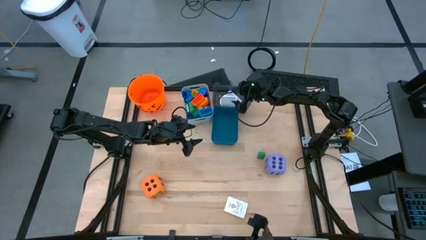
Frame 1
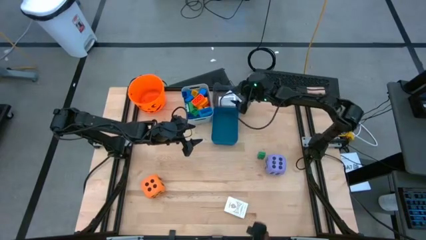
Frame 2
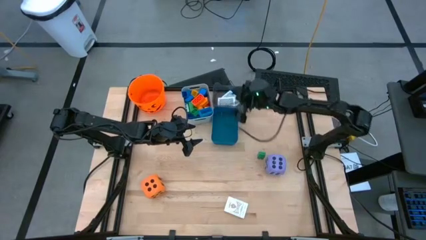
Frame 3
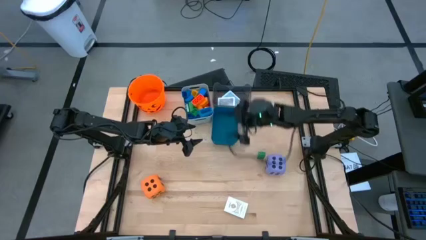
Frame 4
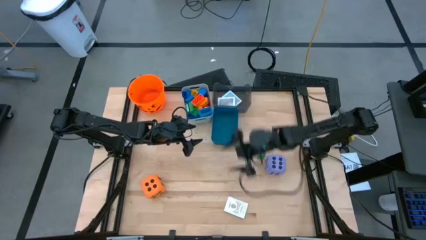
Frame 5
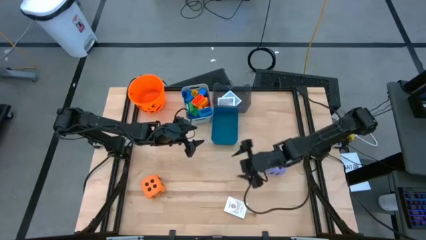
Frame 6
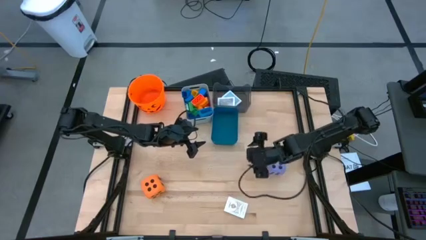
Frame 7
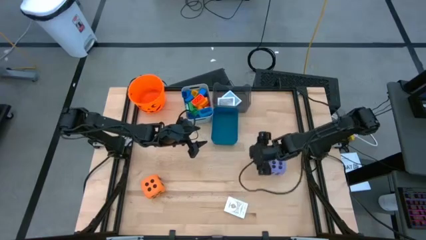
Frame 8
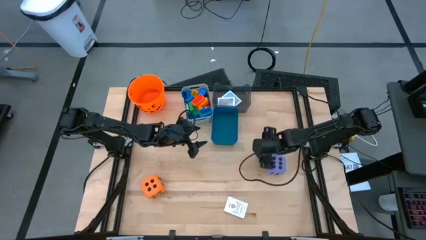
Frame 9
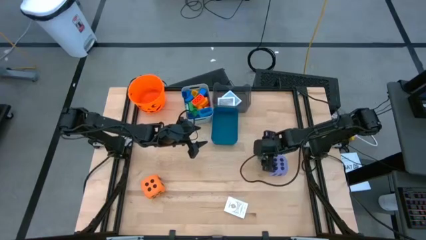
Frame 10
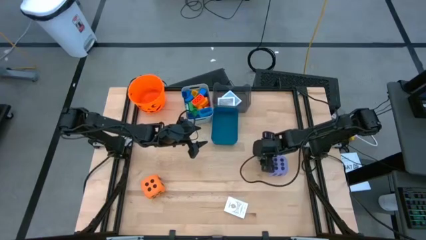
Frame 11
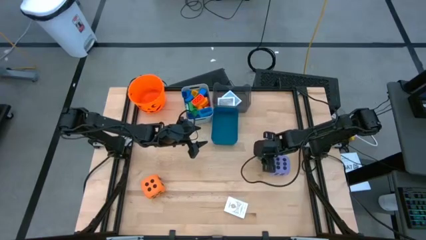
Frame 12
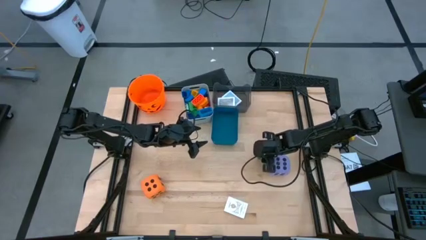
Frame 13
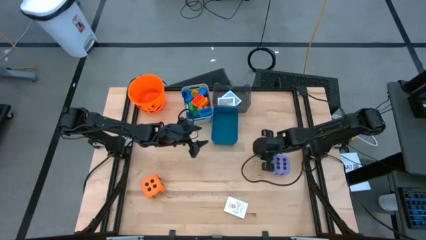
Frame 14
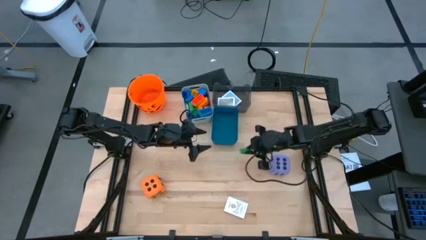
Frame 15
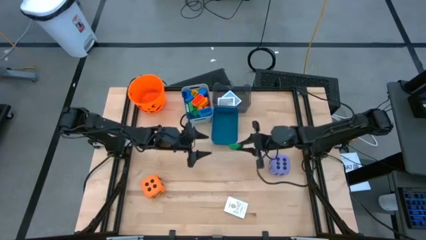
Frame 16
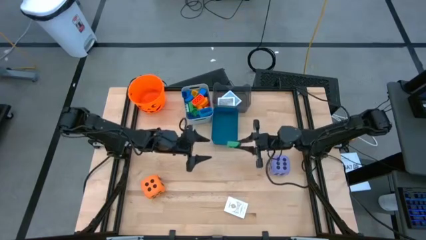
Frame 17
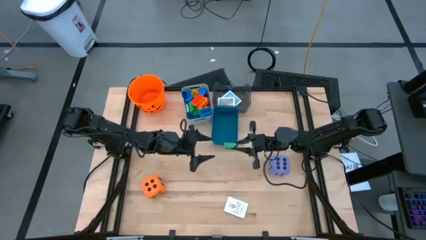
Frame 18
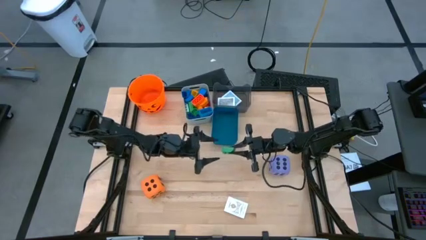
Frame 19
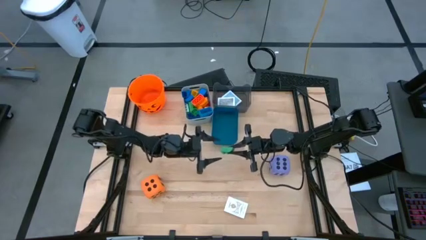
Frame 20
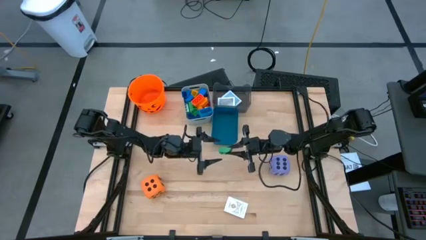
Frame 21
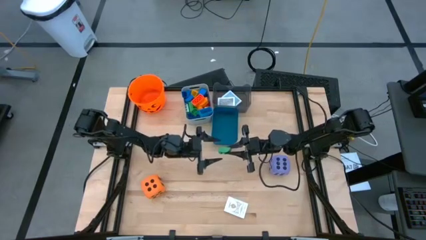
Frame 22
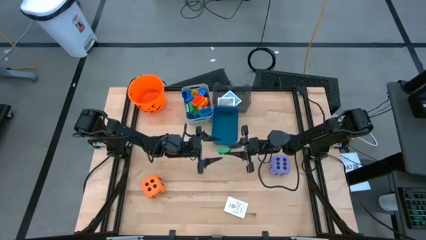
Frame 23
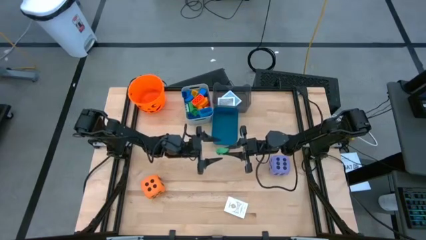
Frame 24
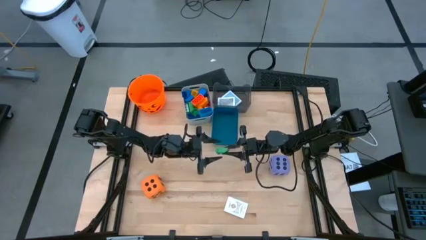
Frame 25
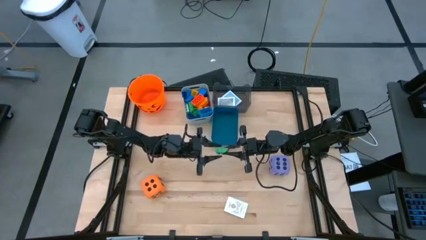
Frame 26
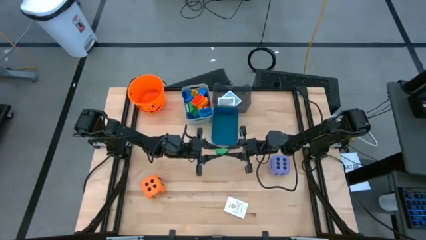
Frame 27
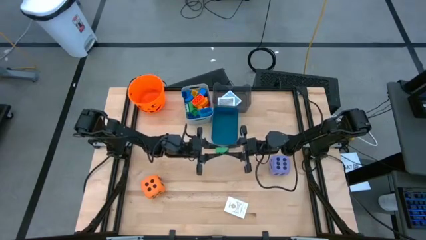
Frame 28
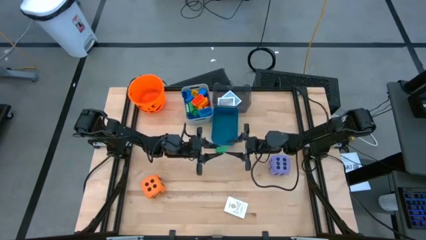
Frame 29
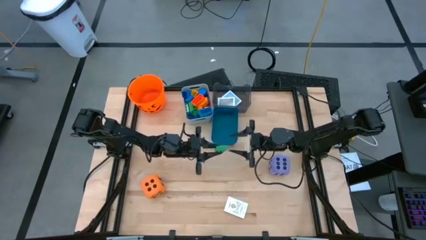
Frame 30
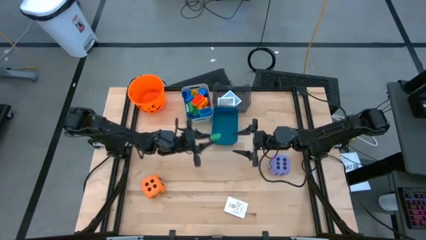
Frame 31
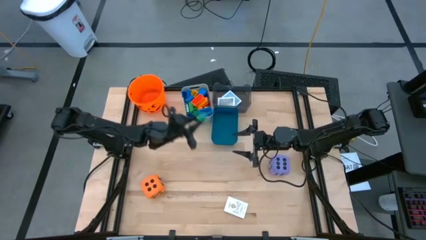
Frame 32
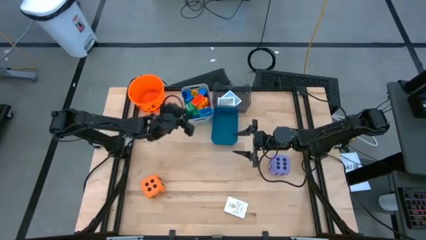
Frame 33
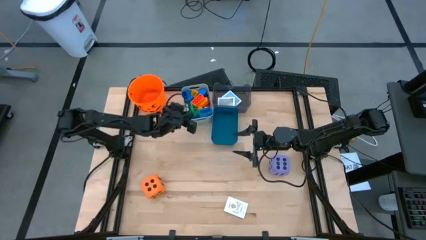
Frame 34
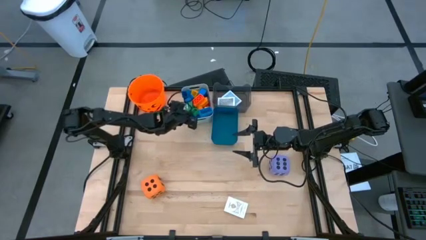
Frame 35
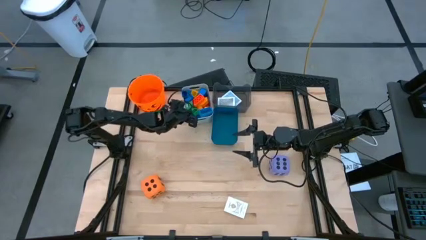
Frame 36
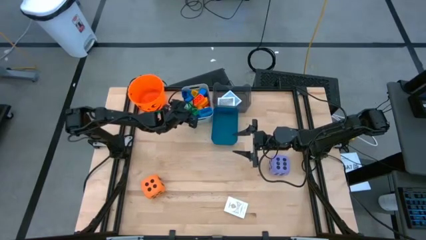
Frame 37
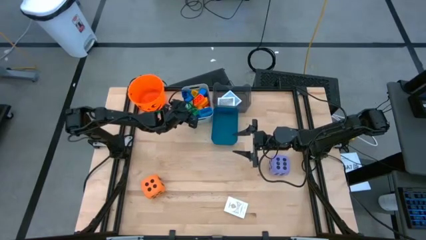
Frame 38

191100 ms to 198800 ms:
Task: Pick & Place Toys
Put the small green gamepiece into the white bin

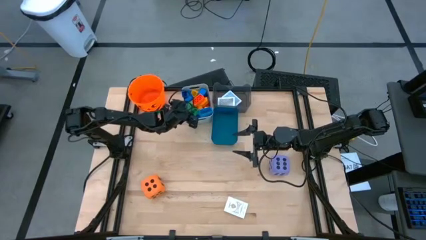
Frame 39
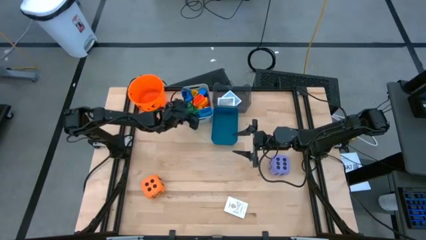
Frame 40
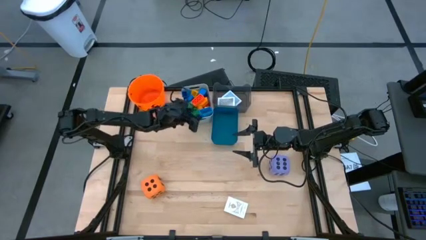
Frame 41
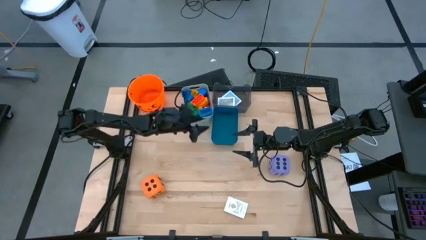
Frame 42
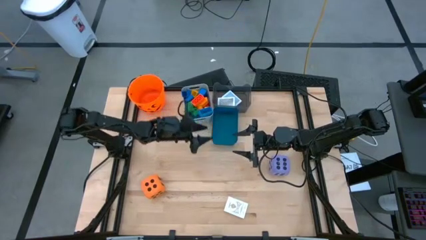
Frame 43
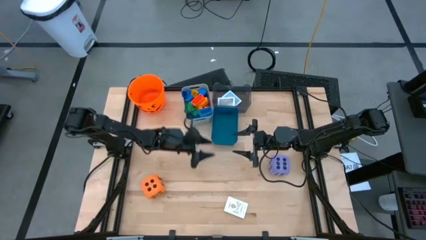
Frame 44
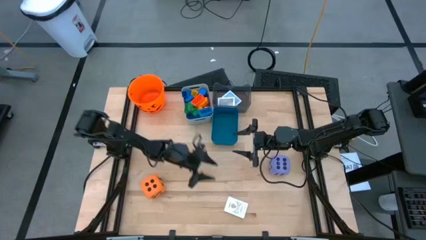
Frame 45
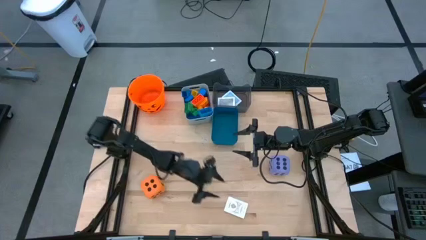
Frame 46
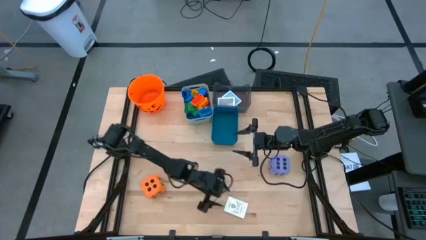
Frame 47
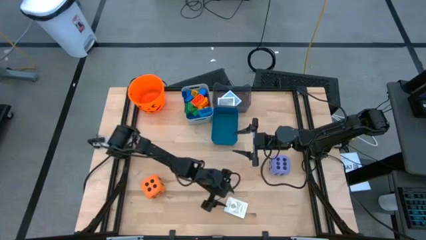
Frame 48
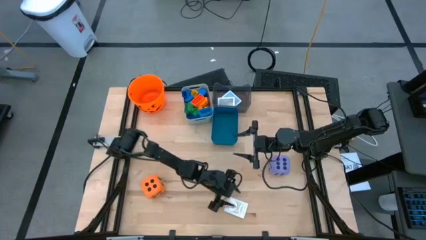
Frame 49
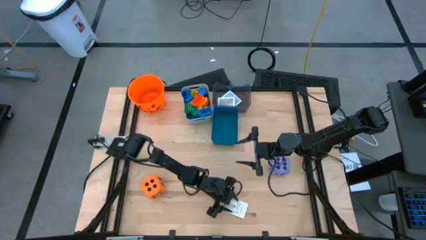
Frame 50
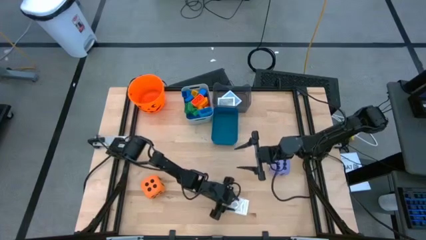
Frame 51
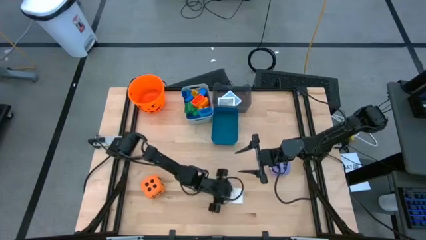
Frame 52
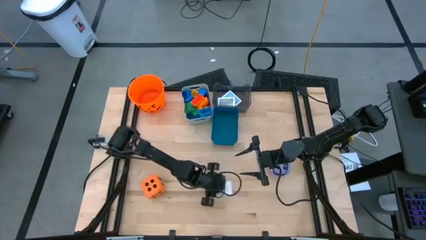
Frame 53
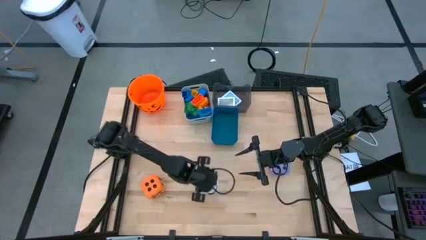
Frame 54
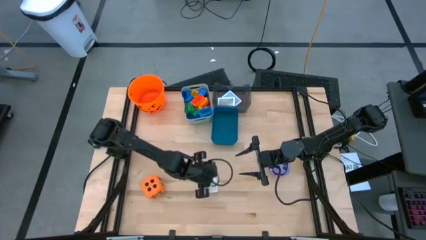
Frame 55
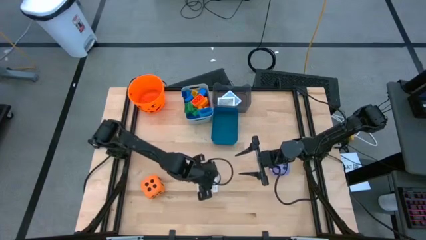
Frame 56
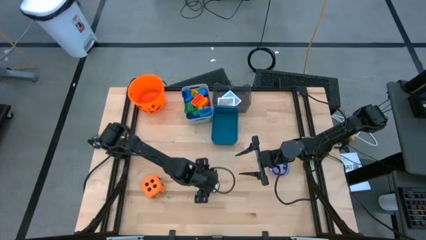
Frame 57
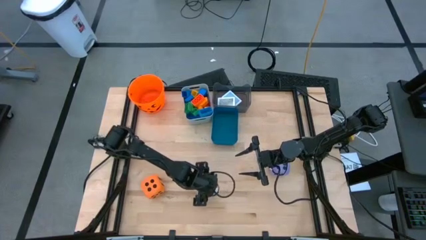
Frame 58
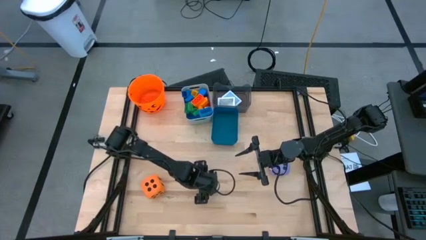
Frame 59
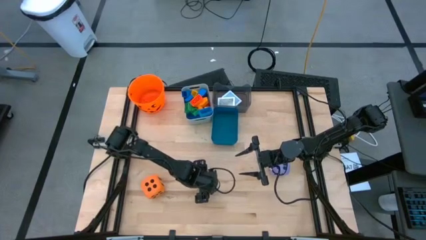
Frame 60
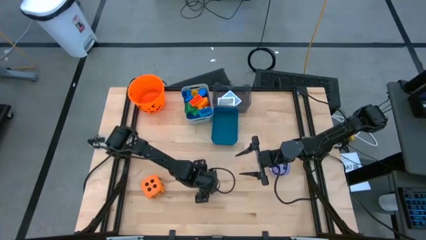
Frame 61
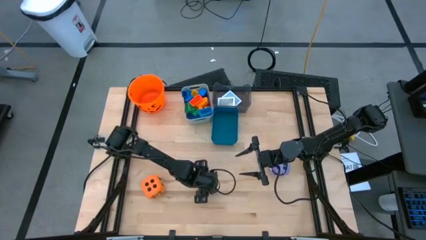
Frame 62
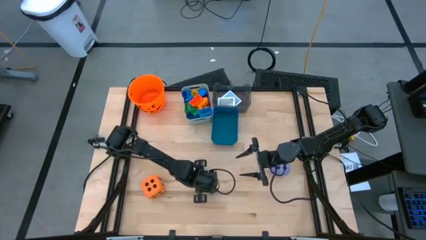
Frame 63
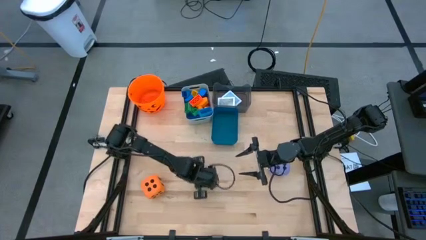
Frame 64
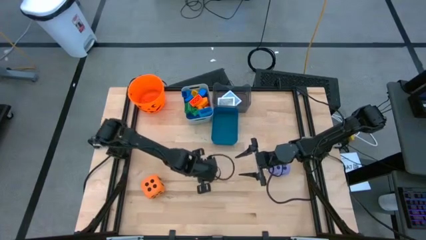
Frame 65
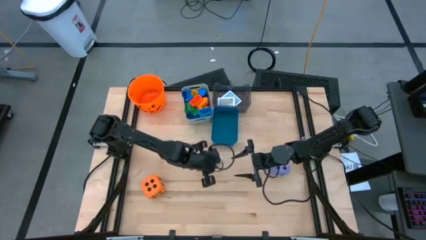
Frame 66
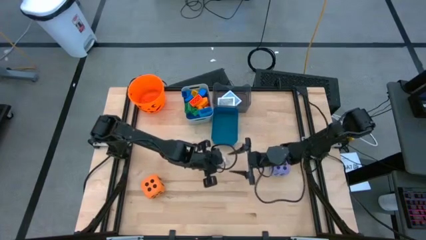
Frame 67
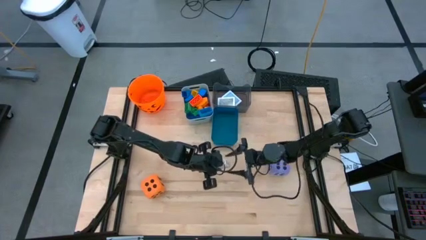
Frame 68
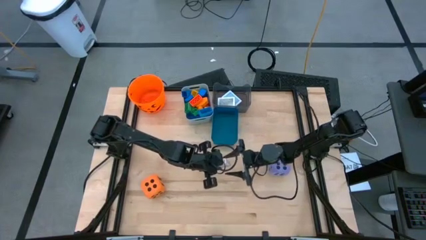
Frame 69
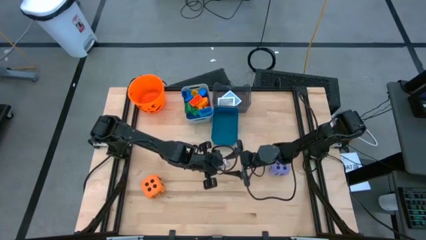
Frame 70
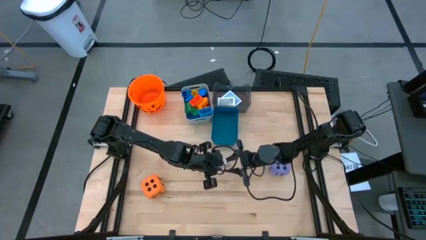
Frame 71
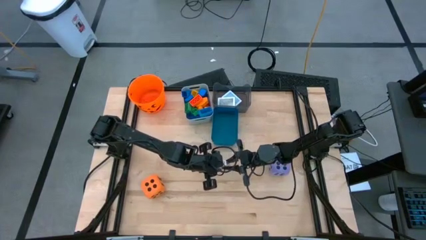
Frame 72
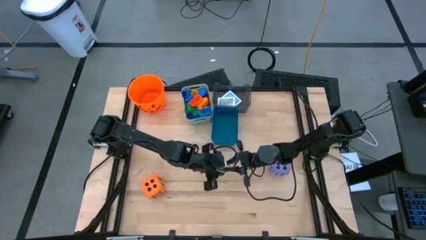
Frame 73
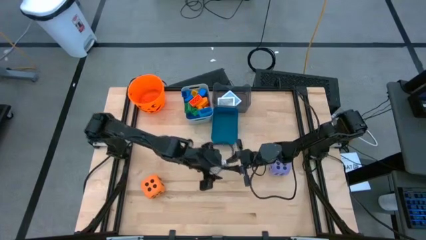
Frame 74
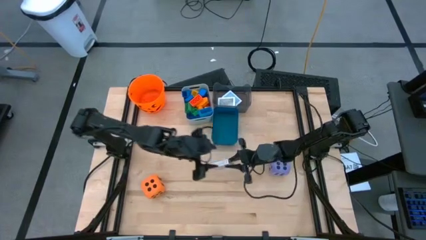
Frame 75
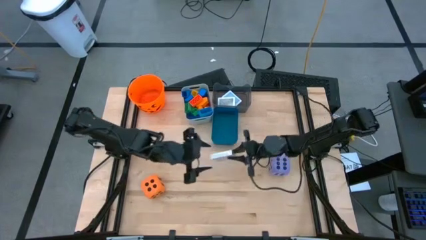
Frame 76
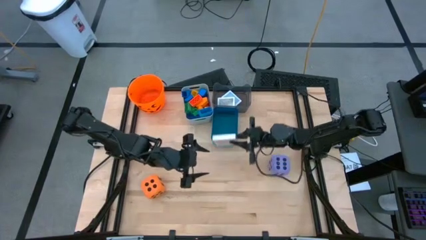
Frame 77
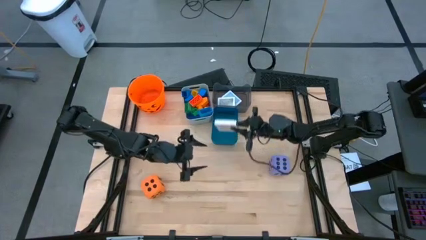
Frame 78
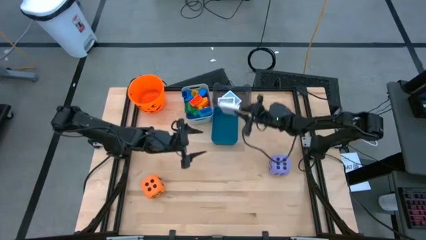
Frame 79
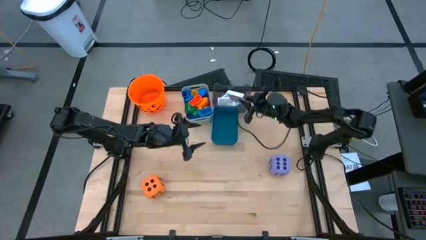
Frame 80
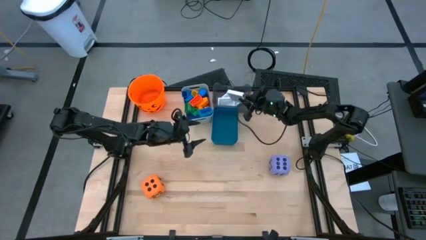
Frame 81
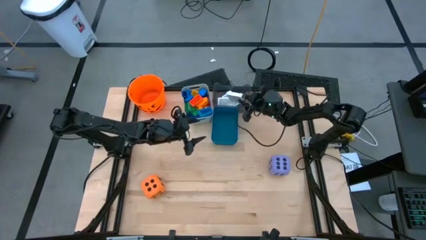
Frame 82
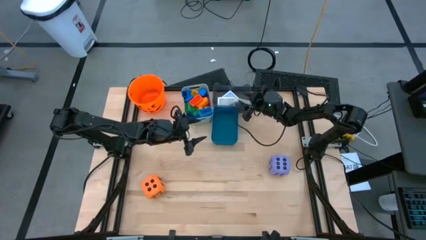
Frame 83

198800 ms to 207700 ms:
Put the white and brown deck of cards into the black bin
